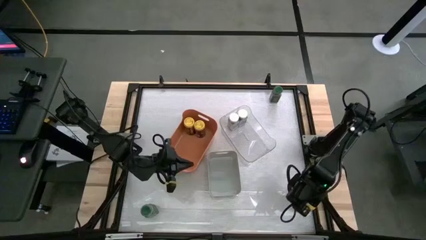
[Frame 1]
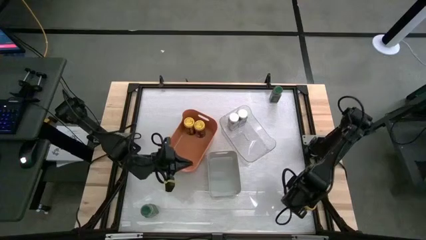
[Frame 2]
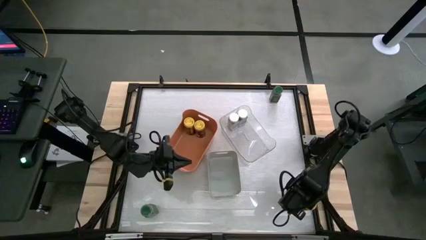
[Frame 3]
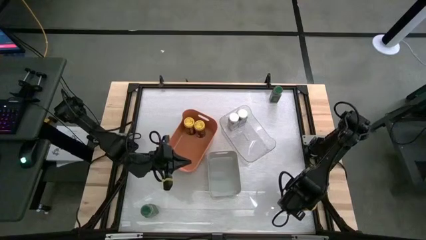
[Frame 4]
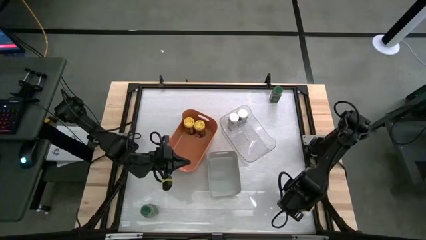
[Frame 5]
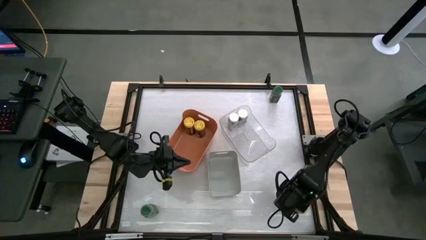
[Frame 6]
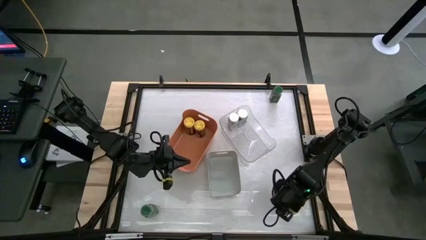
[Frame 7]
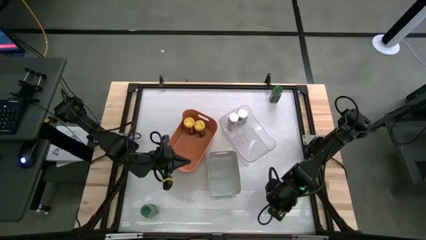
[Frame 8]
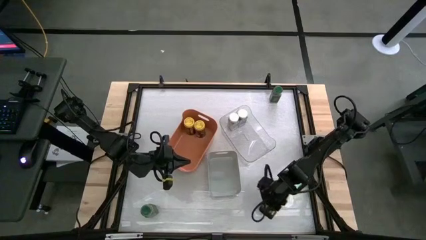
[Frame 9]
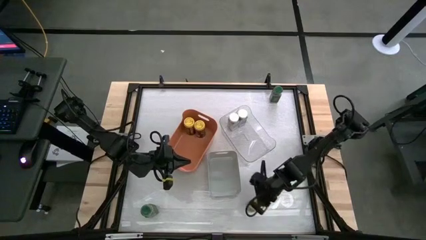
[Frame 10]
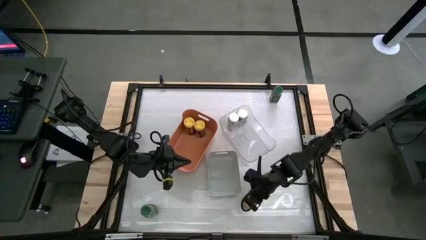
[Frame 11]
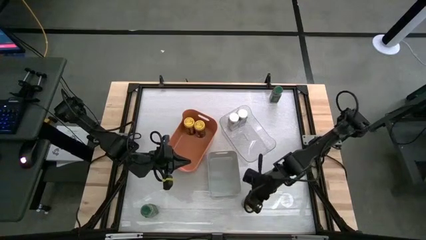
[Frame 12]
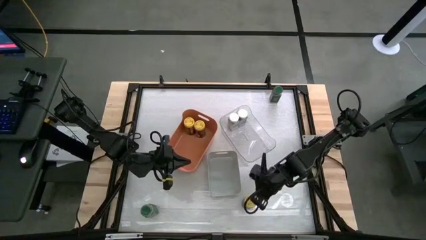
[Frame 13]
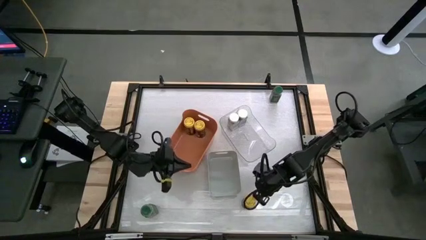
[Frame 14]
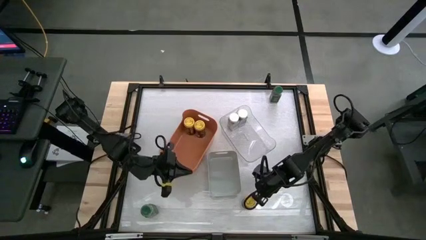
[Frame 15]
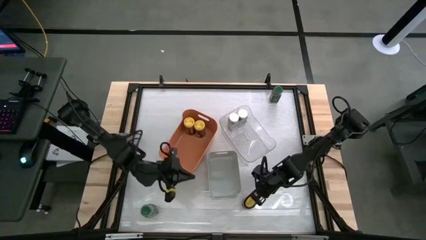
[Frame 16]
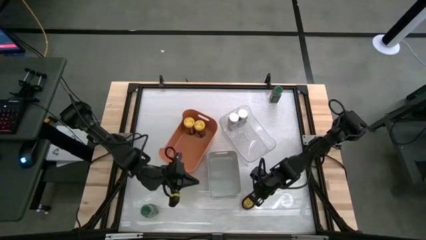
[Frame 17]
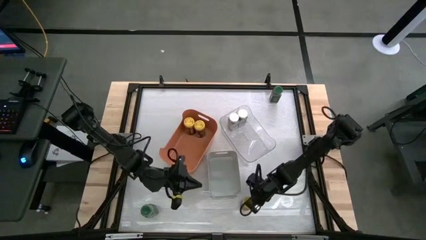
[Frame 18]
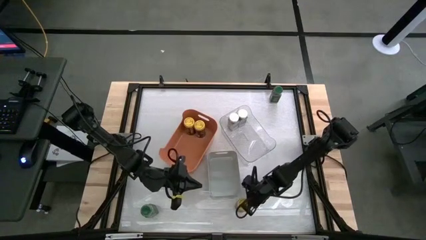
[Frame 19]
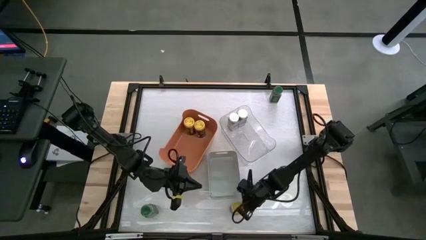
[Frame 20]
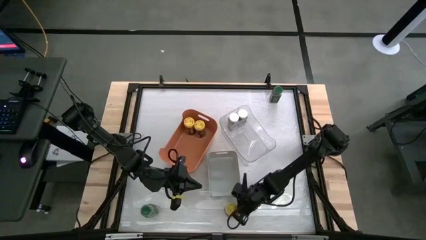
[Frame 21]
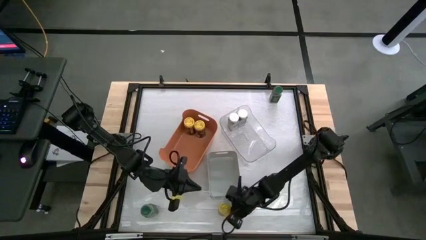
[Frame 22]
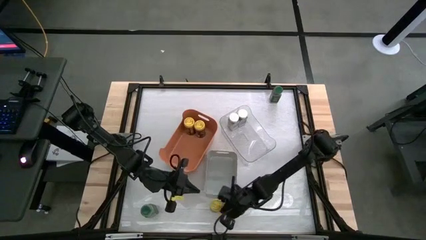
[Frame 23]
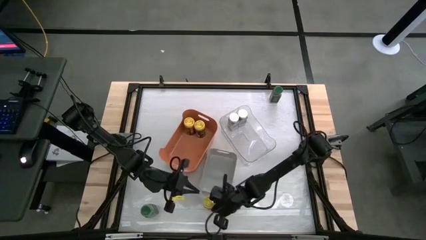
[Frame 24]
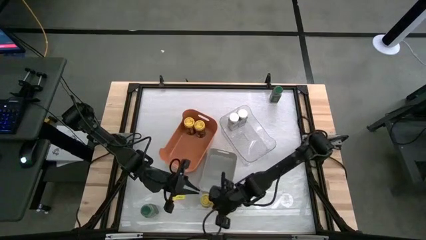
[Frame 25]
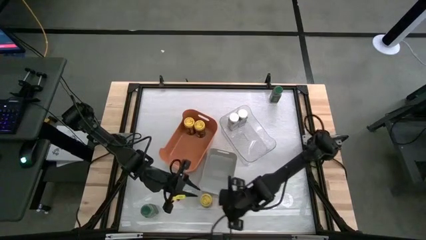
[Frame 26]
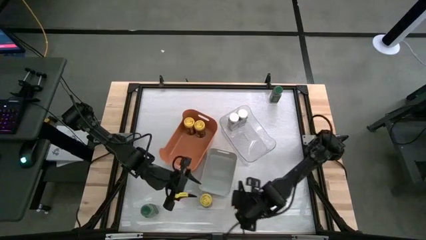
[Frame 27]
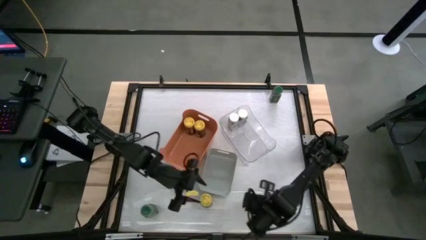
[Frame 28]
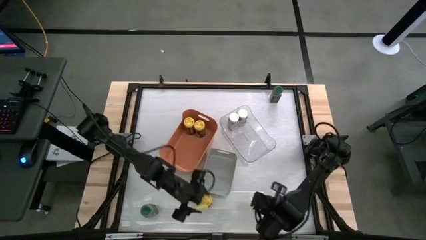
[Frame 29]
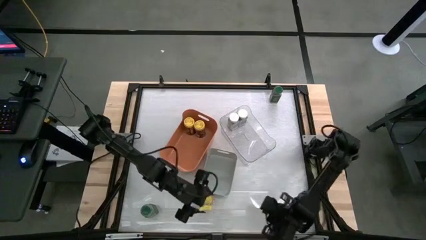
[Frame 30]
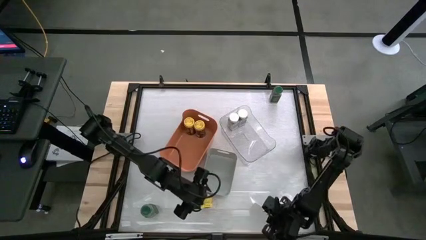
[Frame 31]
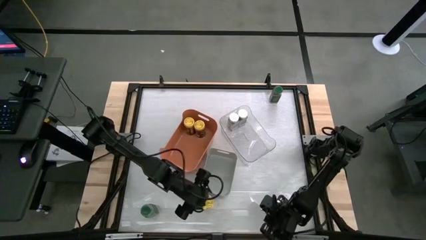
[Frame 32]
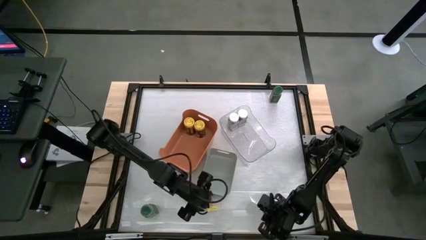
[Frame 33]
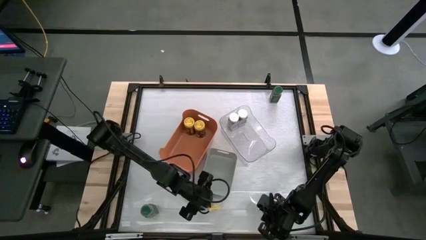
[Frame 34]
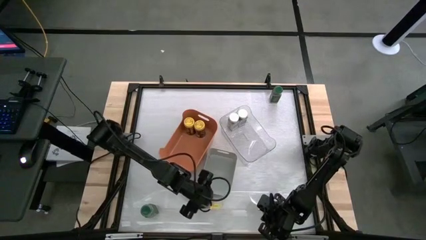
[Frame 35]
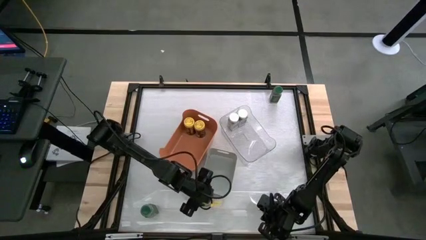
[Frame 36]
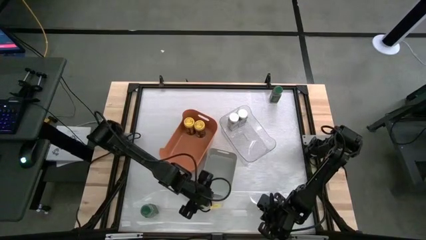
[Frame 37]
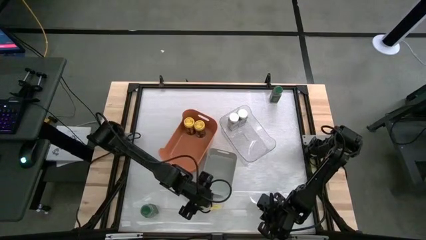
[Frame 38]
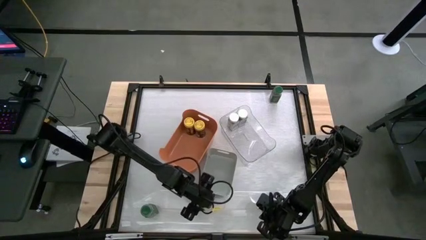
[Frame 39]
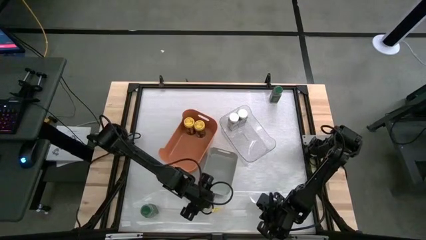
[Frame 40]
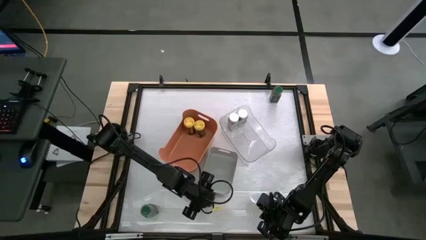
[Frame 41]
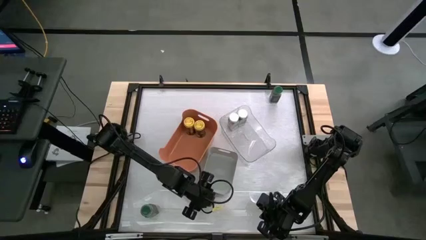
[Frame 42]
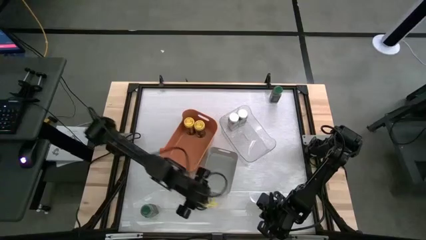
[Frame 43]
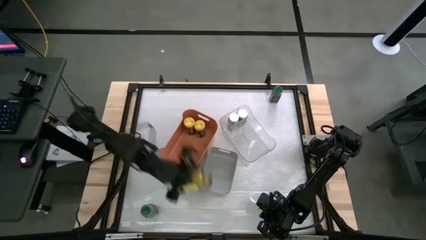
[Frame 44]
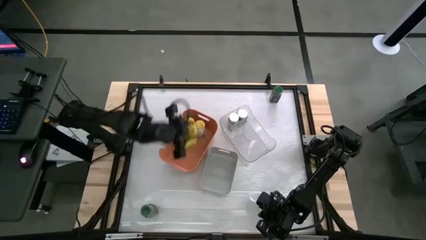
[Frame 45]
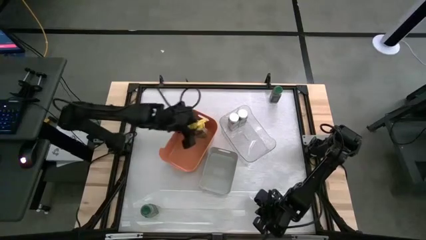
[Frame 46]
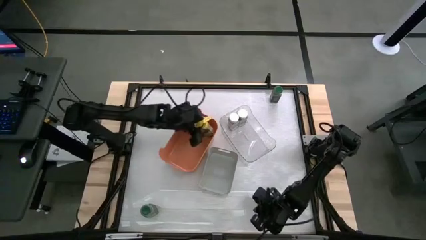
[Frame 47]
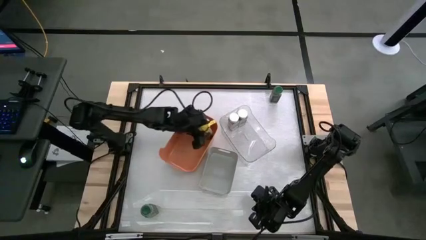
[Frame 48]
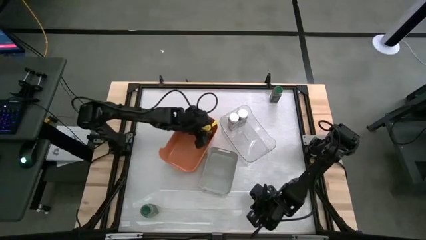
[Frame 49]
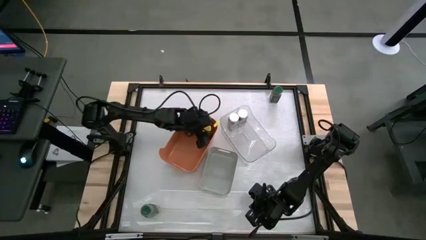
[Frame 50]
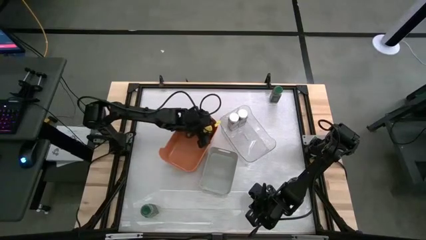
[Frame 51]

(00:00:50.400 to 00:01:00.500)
Task: Sort spices by type
Put the yellow seasoning bottle into the orange bin

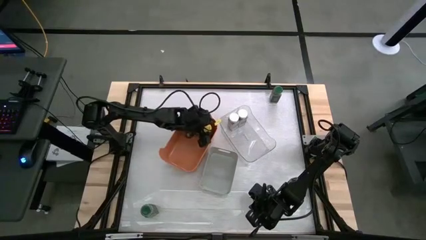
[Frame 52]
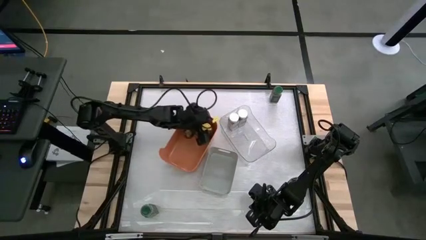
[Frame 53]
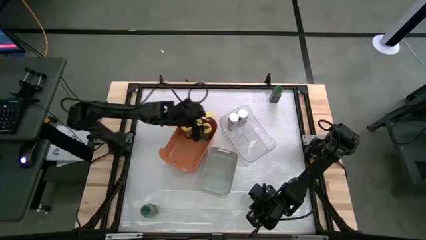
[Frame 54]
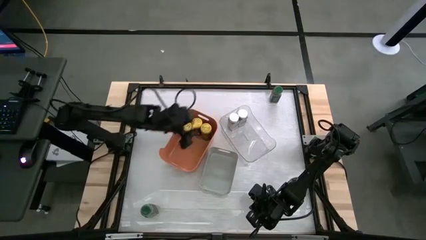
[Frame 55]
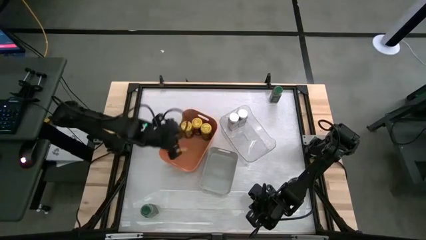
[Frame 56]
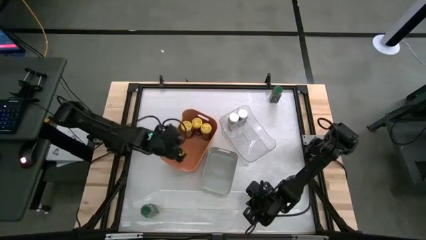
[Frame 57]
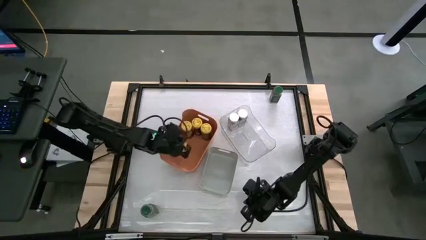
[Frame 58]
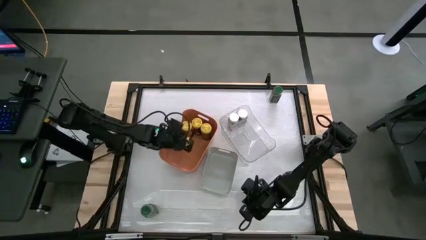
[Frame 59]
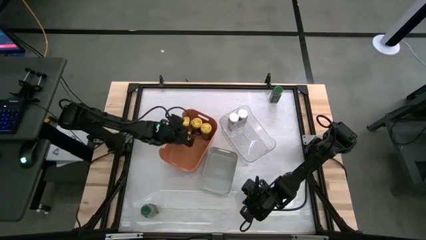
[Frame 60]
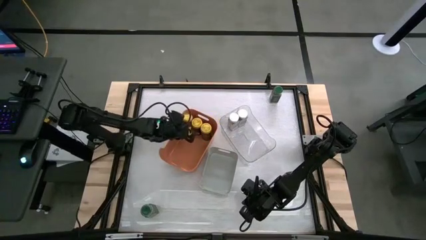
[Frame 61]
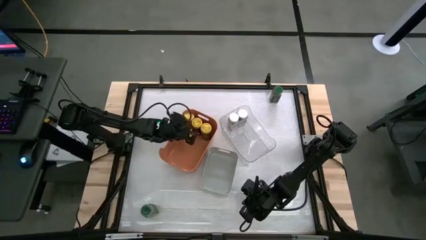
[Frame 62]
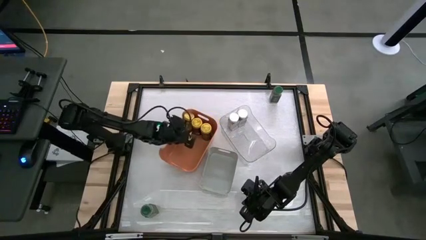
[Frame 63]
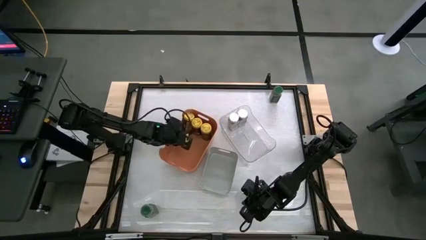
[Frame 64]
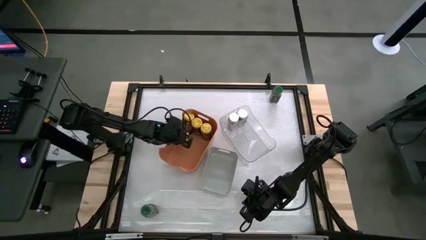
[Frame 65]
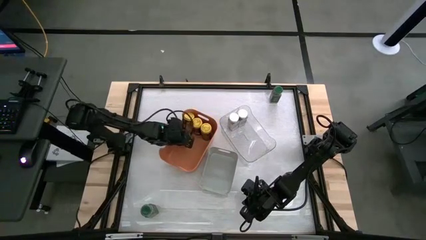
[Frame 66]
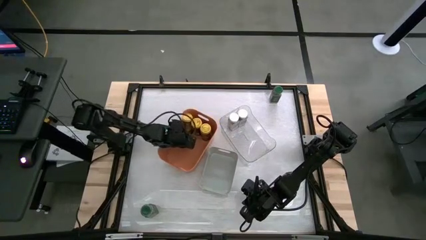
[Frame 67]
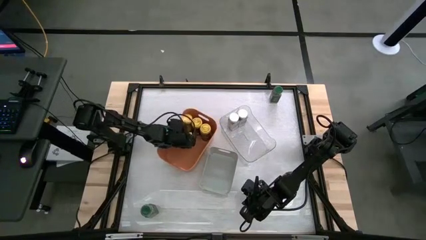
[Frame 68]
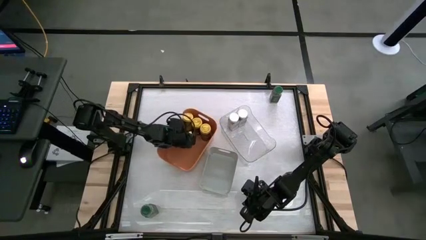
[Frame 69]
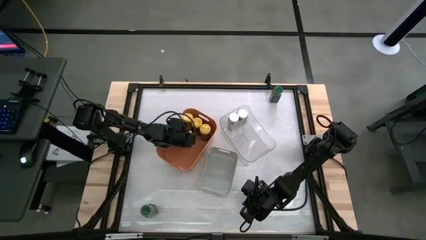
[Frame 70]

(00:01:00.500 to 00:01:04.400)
Put the yellow seasoning bottle into the orange bin
